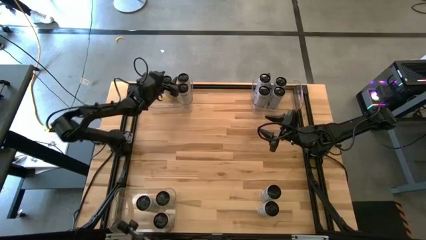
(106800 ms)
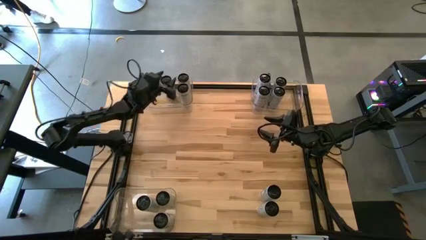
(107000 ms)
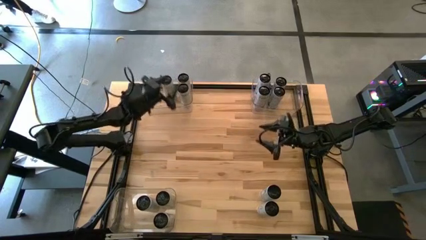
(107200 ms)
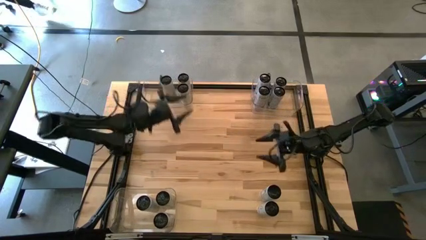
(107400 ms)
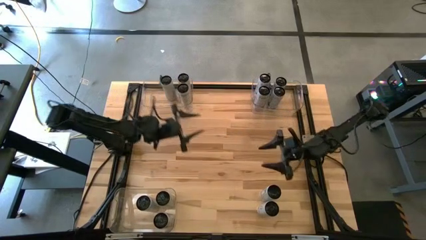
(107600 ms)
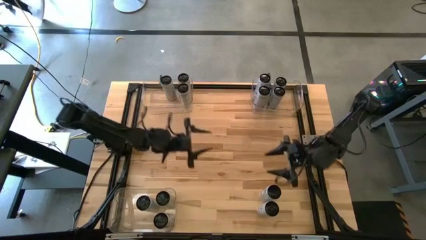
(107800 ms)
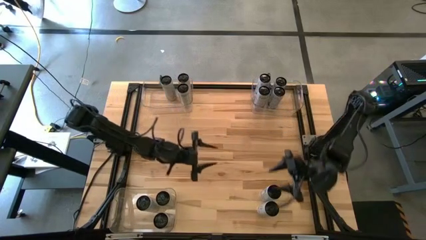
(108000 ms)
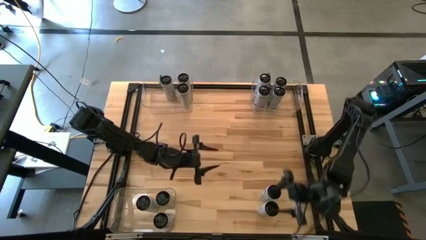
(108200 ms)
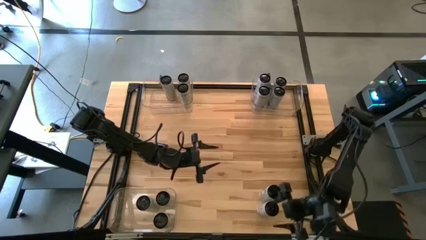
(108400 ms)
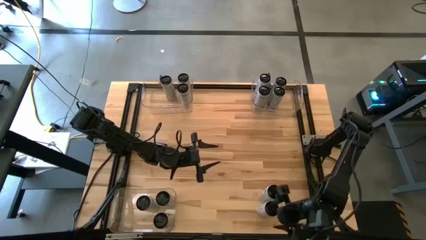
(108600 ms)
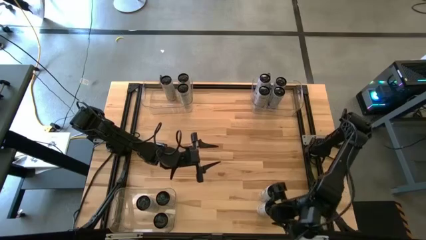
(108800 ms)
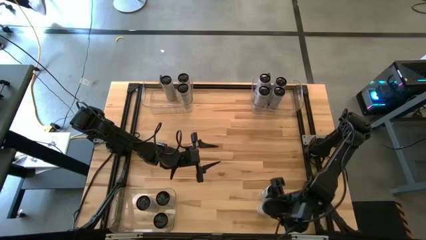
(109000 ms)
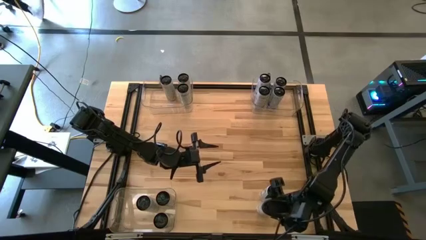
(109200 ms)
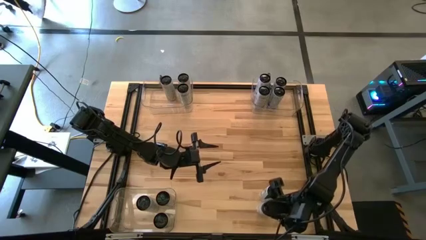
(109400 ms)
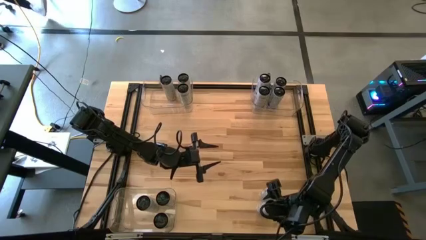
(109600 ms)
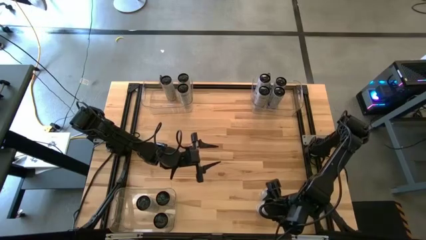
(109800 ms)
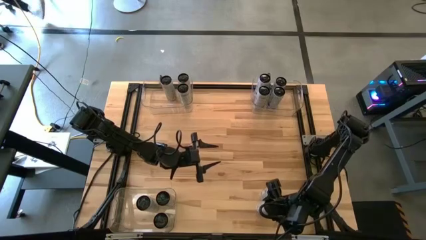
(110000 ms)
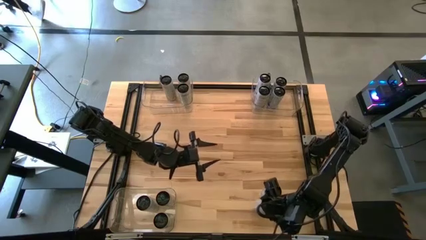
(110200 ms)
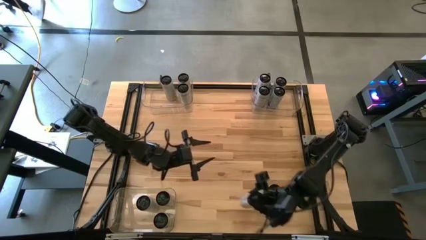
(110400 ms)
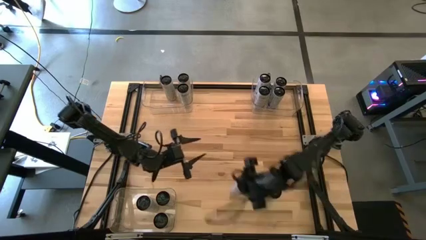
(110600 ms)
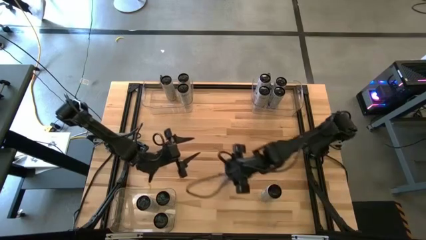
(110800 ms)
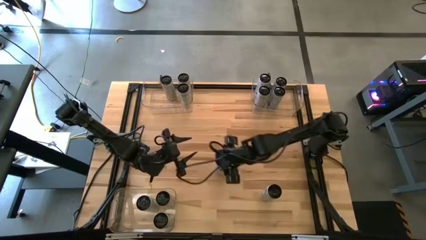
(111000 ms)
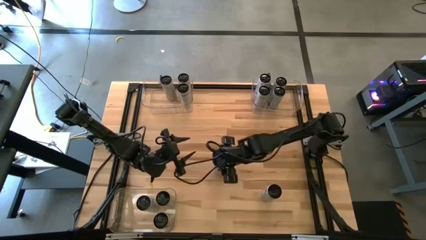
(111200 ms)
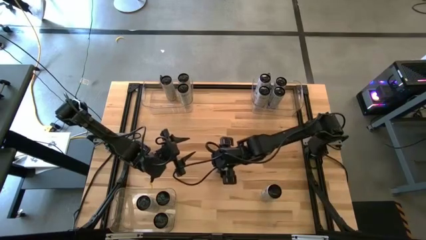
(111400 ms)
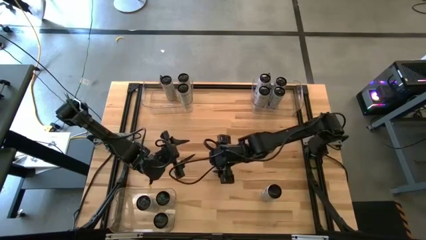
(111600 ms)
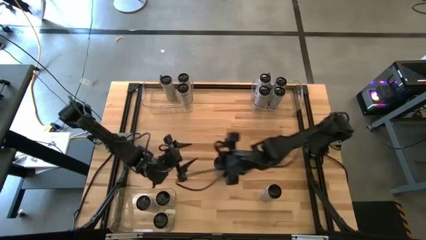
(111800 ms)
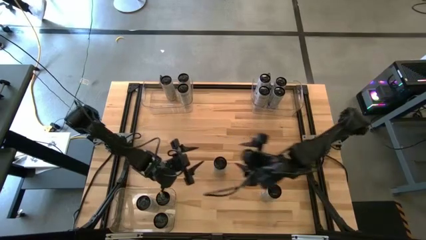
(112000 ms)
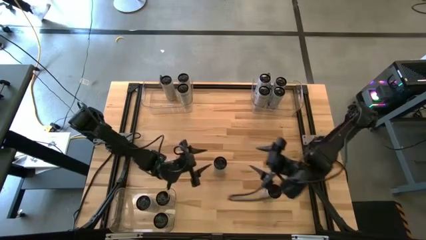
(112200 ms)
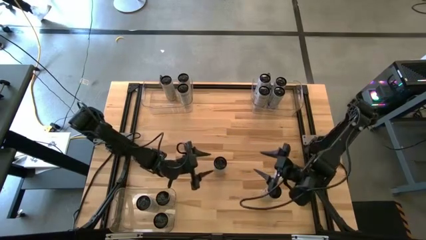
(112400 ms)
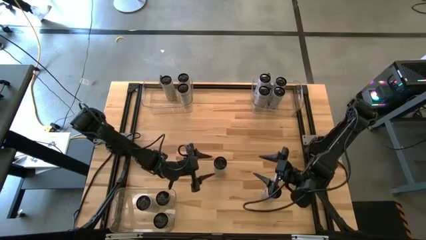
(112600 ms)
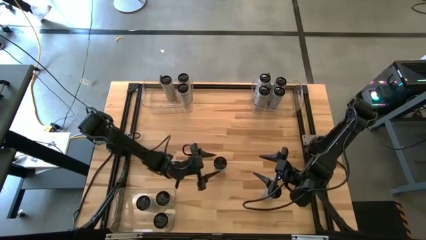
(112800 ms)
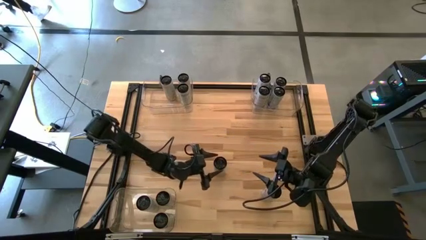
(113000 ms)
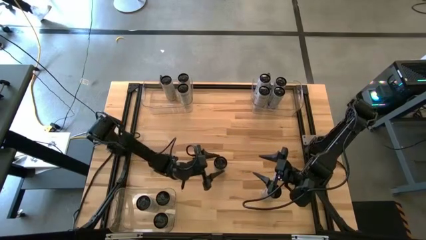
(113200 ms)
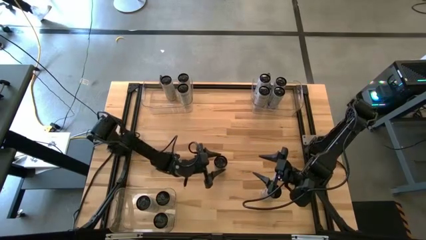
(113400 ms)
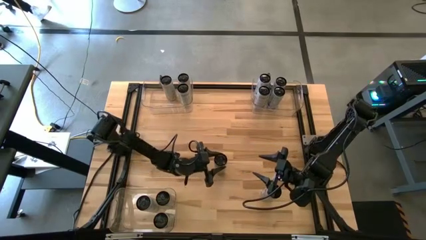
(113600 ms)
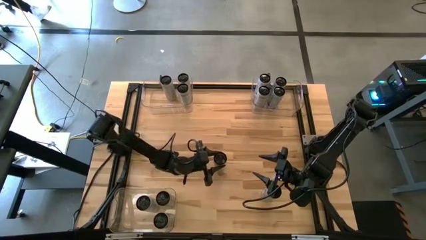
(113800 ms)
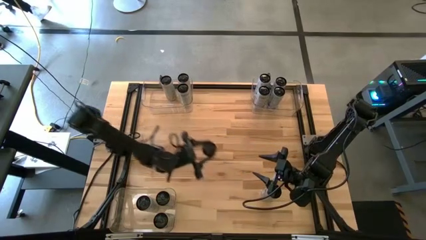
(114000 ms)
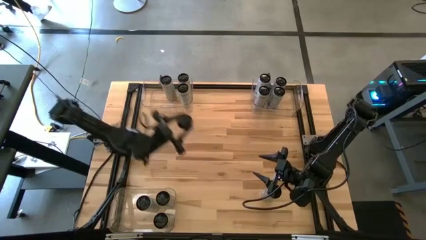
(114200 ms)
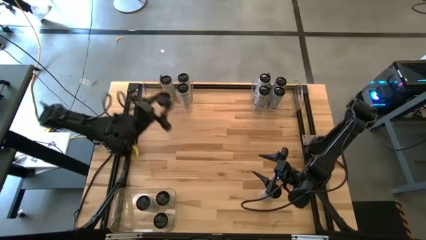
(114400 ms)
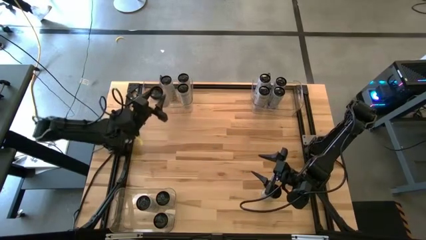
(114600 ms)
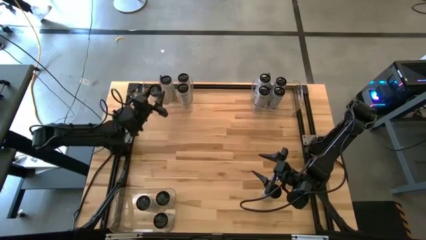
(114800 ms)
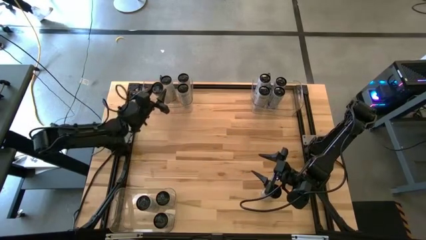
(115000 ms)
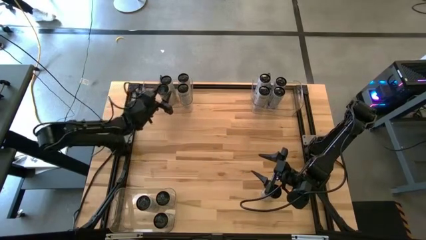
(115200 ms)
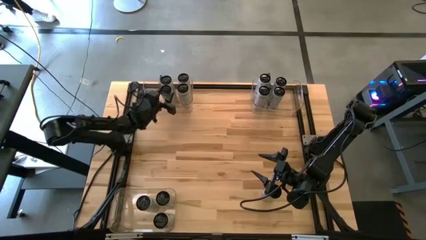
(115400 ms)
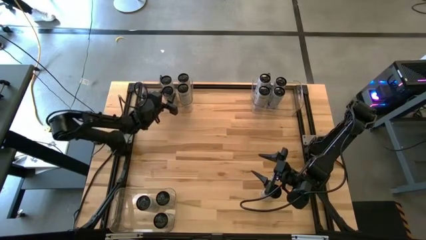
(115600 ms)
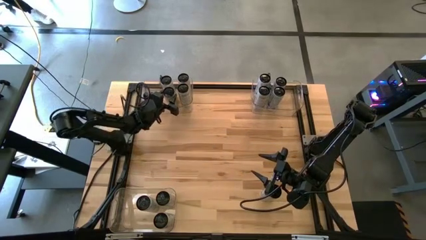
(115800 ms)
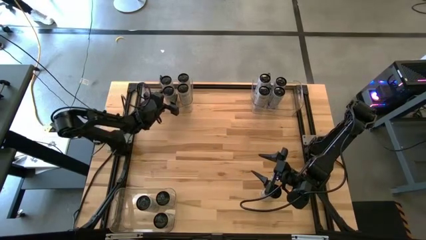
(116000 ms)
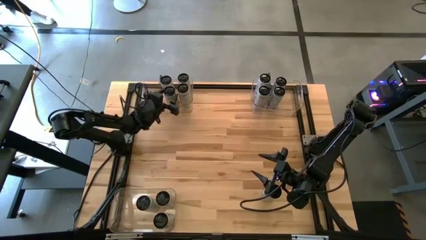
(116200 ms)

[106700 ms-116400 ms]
Task: Sort soda cans
Put the white-yellow soda can into the top left transparent bin

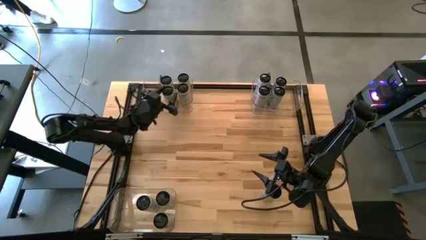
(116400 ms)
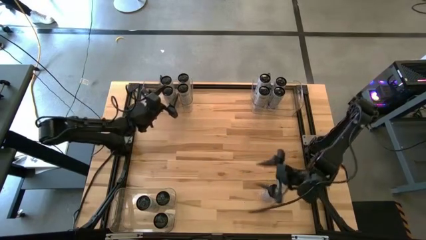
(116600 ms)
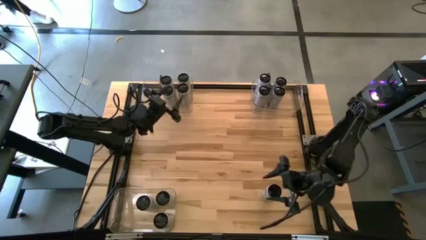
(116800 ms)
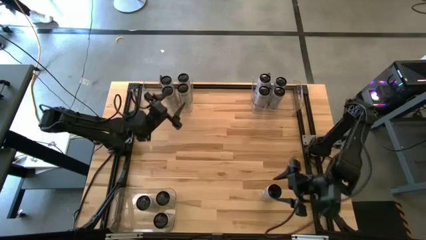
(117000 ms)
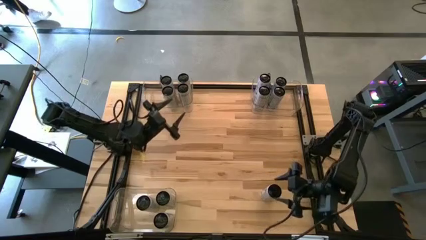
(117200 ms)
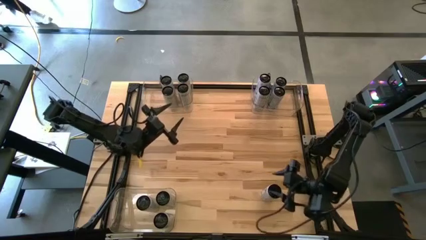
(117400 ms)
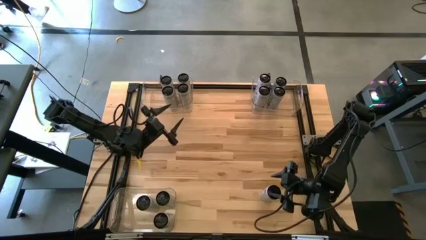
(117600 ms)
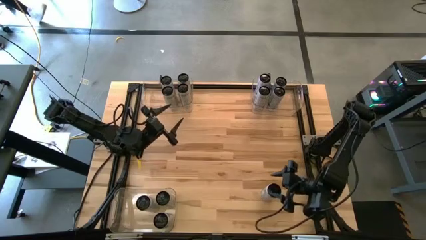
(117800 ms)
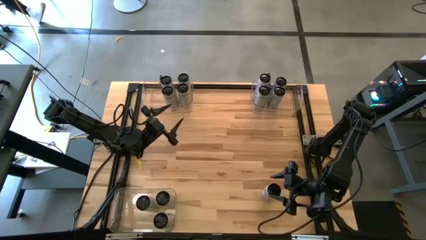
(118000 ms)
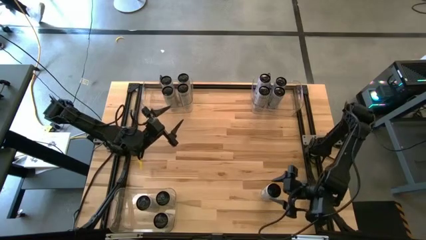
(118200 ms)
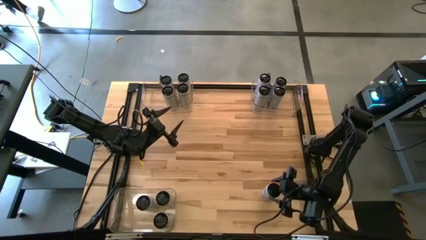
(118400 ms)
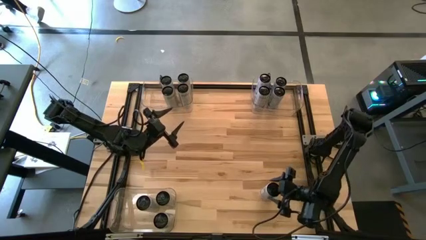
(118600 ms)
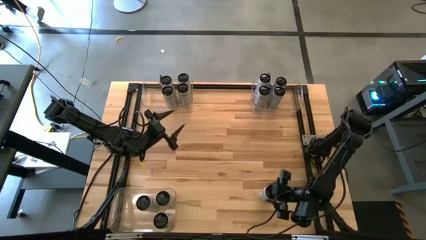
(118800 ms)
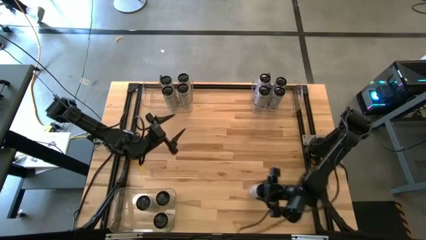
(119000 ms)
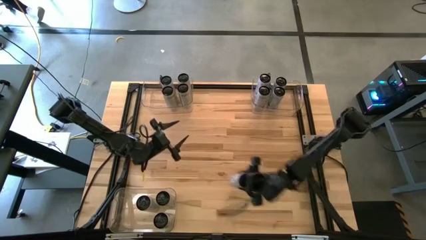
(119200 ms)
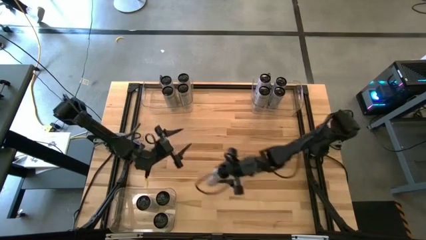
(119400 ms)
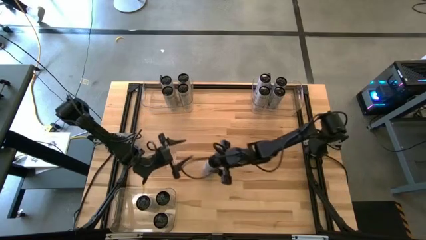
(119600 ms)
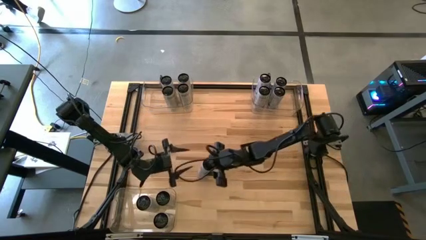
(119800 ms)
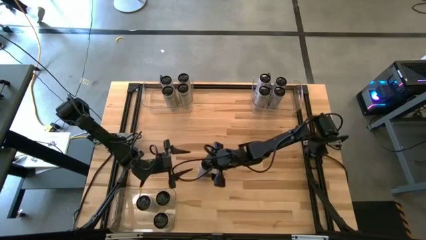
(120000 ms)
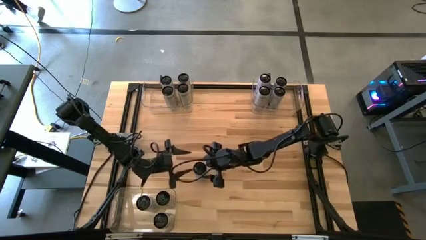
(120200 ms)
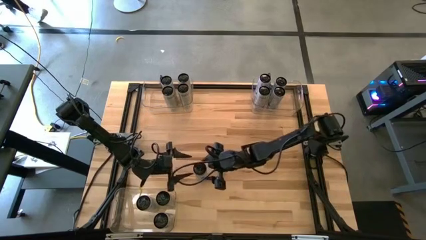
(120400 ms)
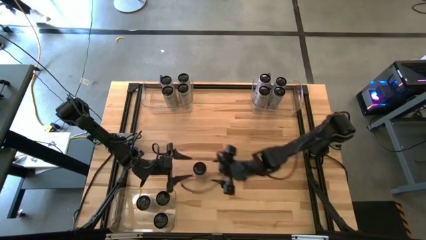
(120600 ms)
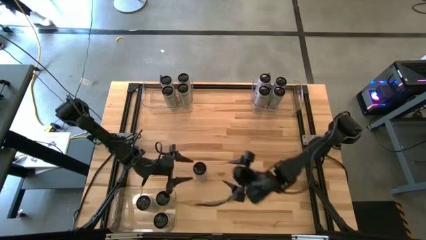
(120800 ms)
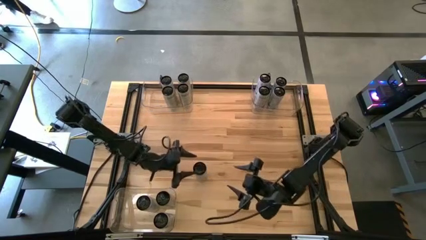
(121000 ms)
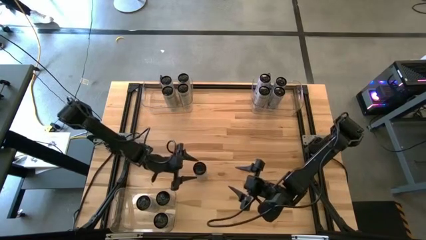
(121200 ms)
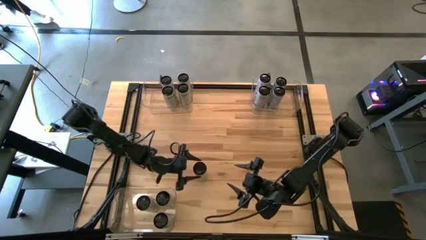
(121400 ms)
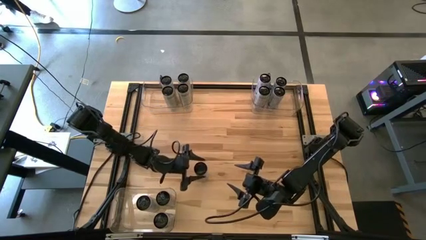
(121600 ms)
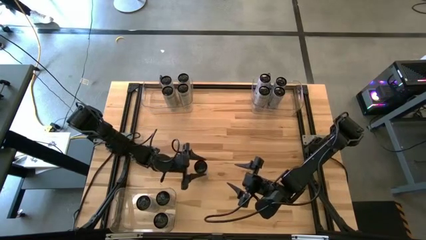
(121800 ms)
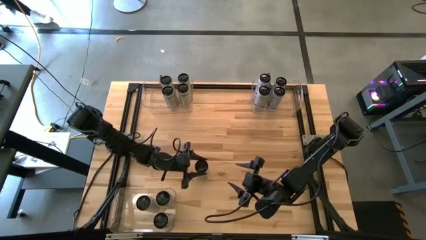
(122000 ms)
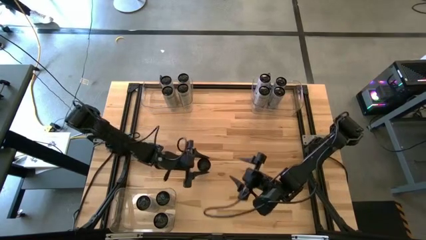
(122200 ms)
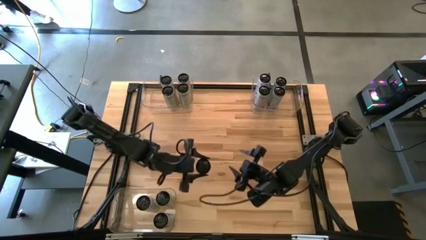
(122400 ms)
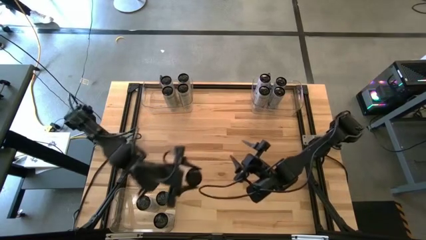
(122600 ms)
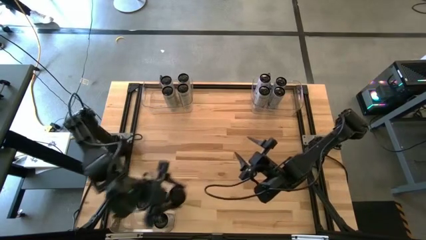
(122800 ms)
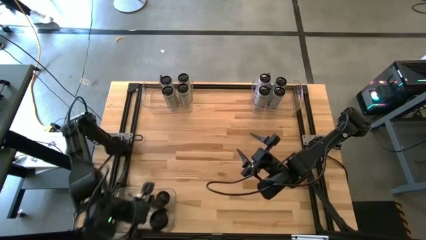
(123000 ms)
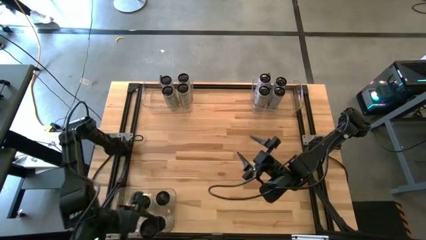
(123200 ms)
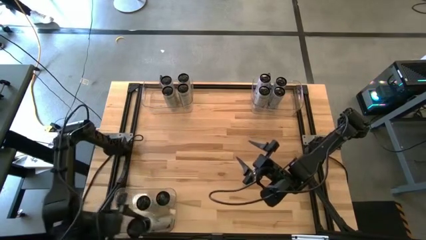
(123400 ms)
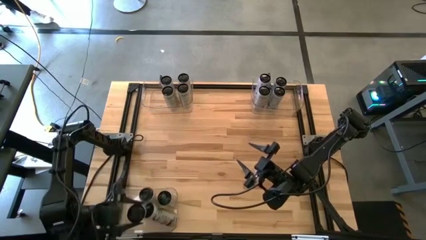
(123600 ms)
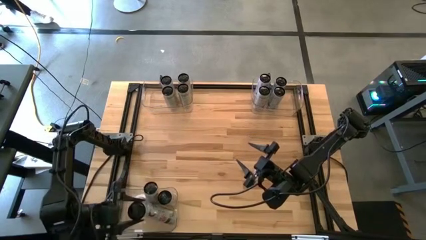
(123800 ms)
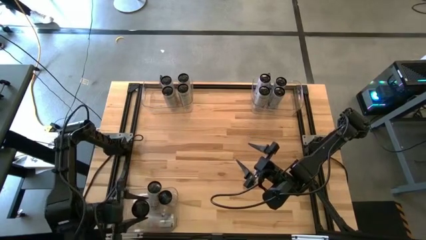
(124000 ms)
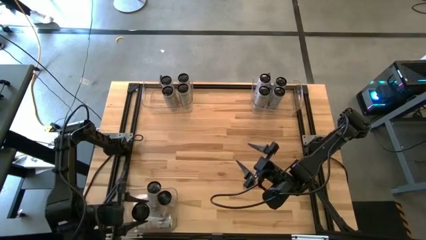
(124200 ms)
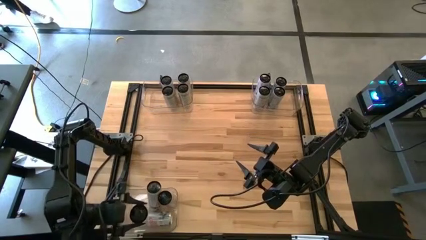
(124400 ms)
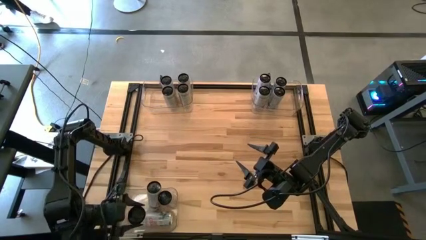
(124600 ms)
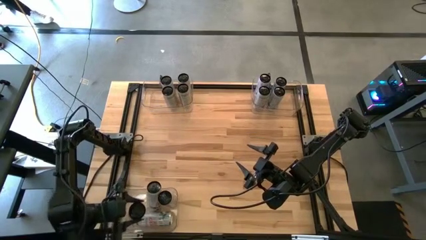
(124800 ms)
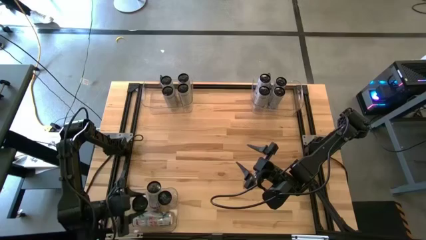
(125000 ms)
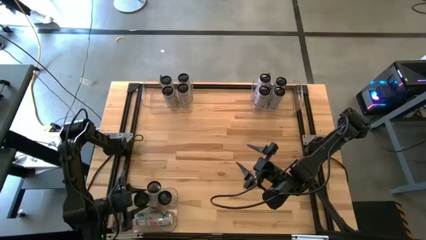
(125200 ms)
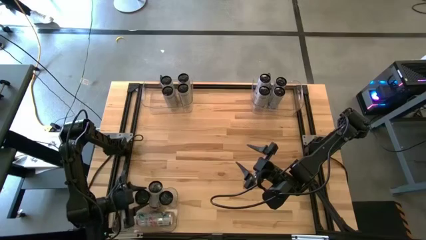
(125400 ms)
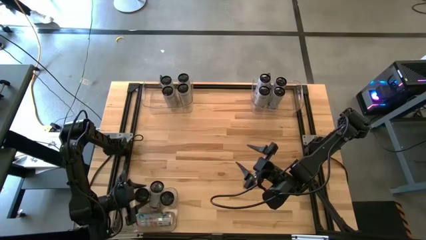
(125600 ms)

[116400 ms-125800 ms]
Put the white-pink soda can into the bottom left transparent bin
